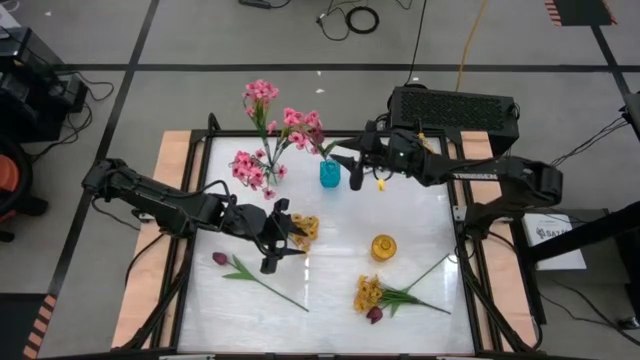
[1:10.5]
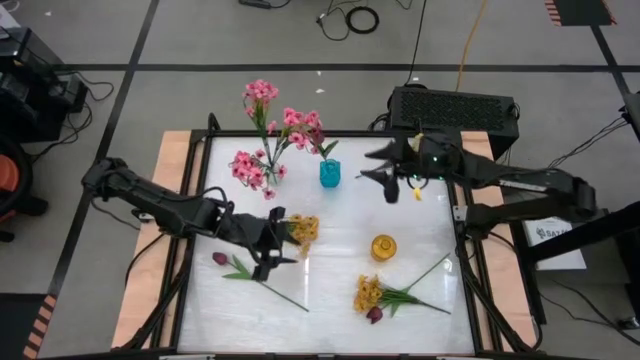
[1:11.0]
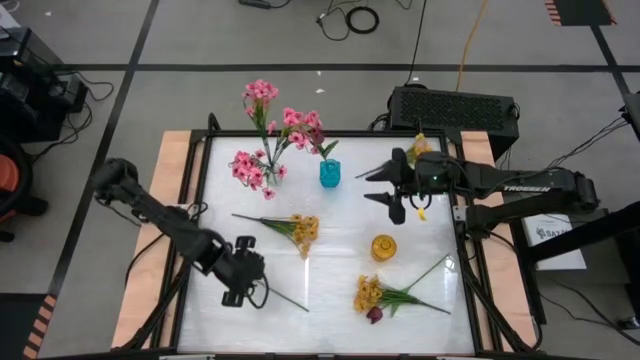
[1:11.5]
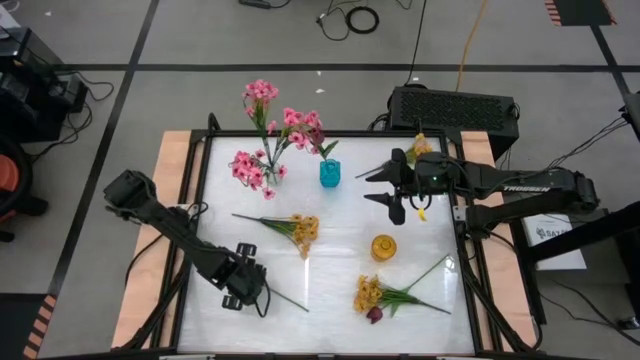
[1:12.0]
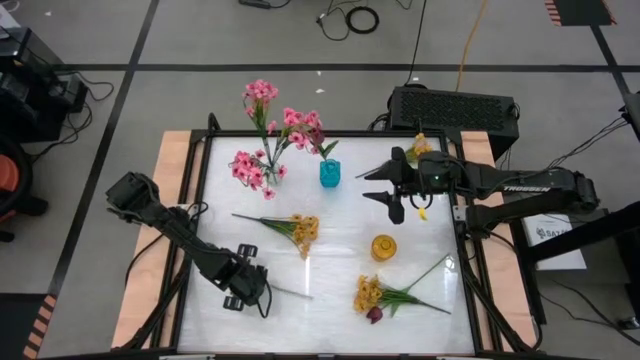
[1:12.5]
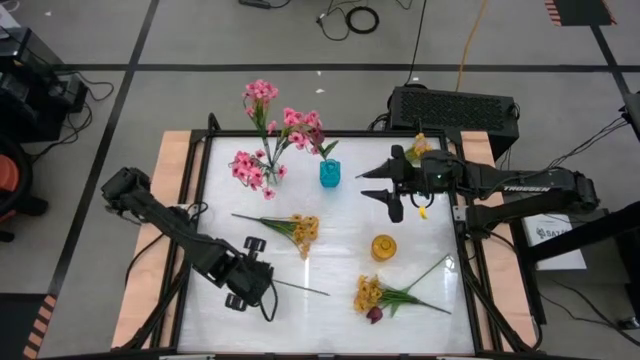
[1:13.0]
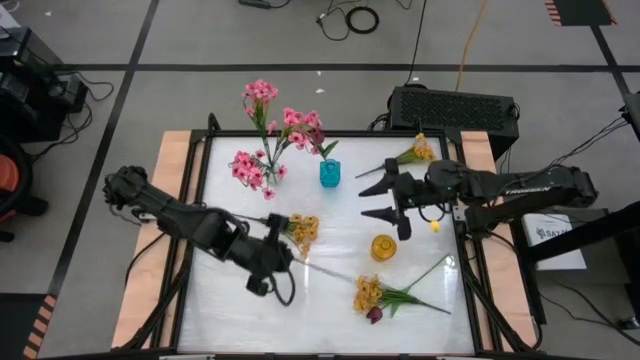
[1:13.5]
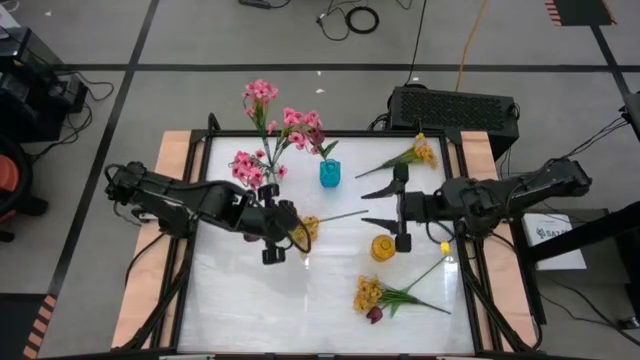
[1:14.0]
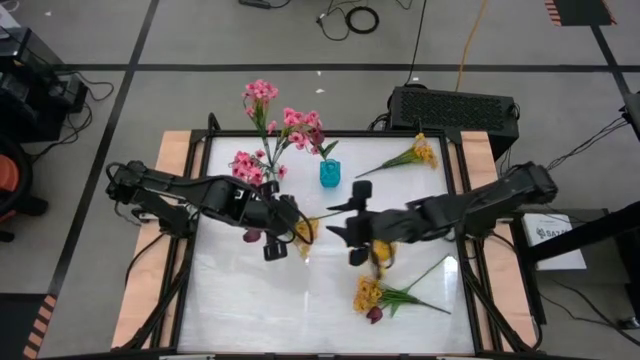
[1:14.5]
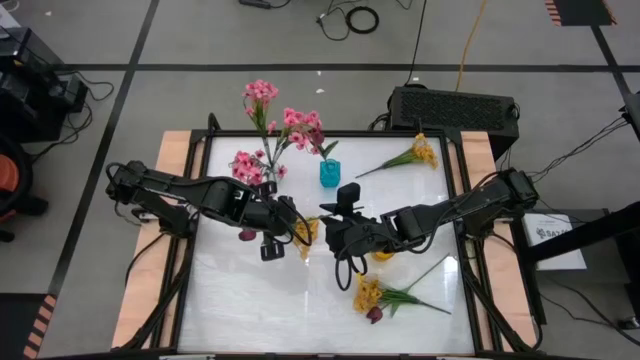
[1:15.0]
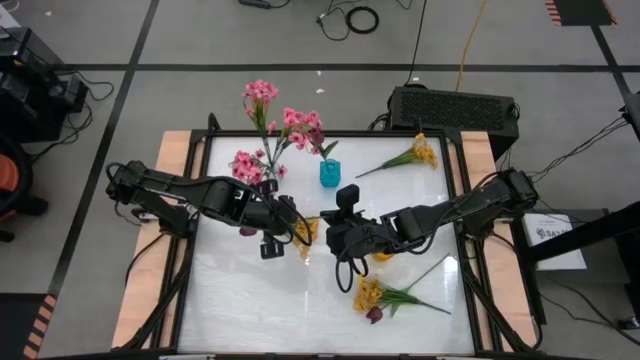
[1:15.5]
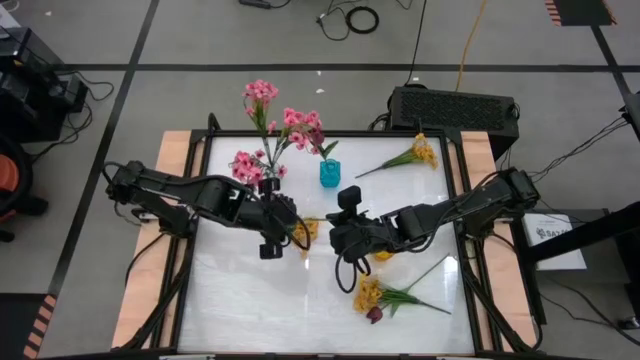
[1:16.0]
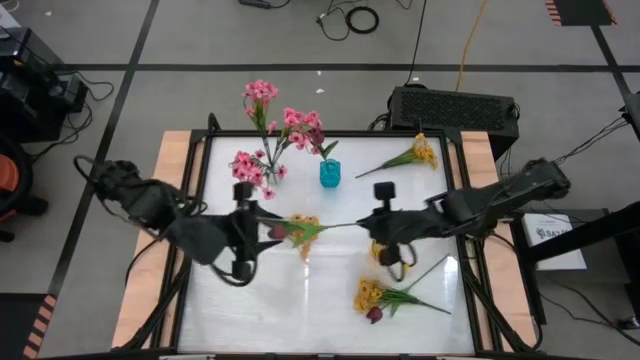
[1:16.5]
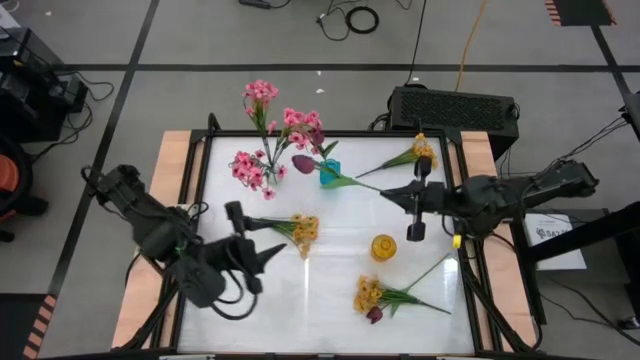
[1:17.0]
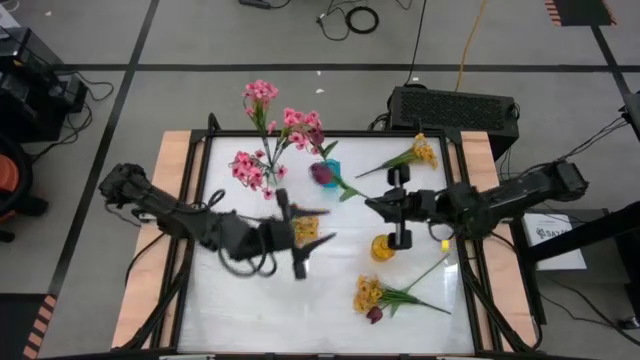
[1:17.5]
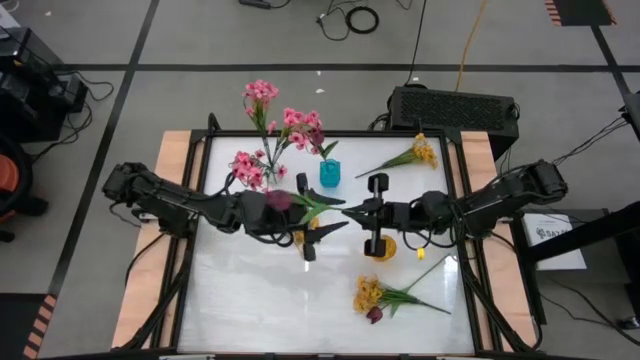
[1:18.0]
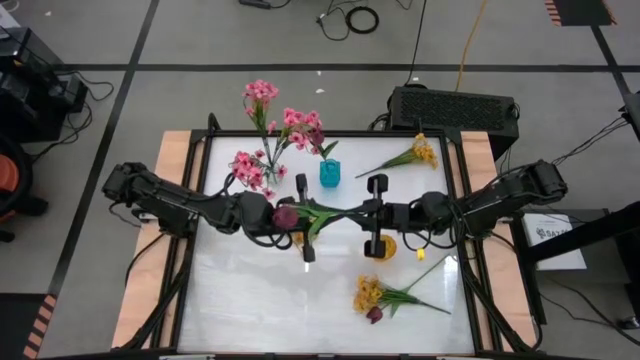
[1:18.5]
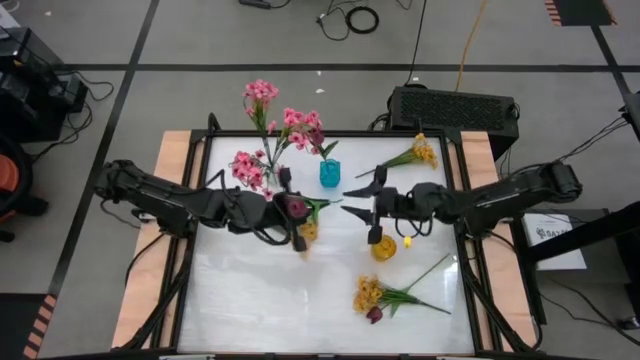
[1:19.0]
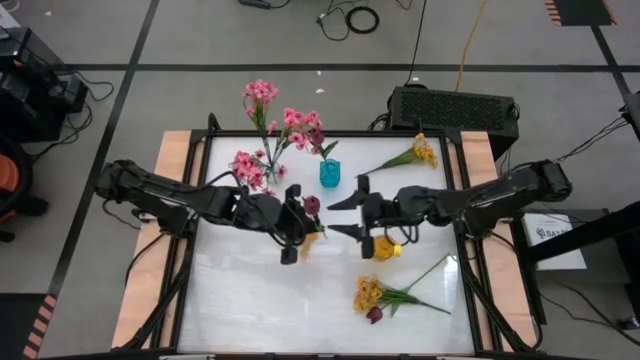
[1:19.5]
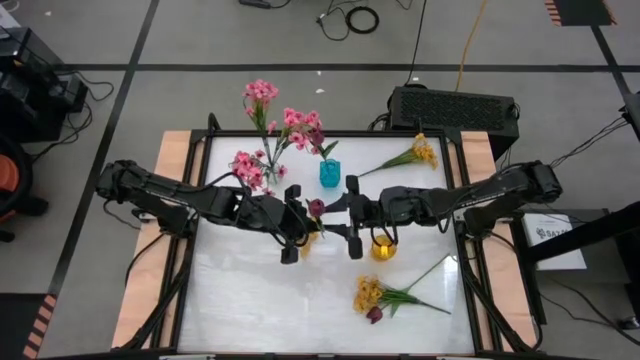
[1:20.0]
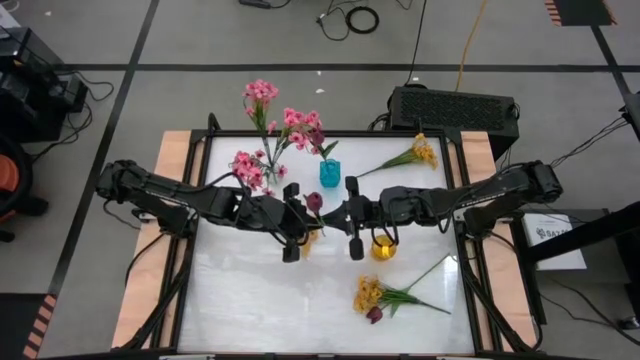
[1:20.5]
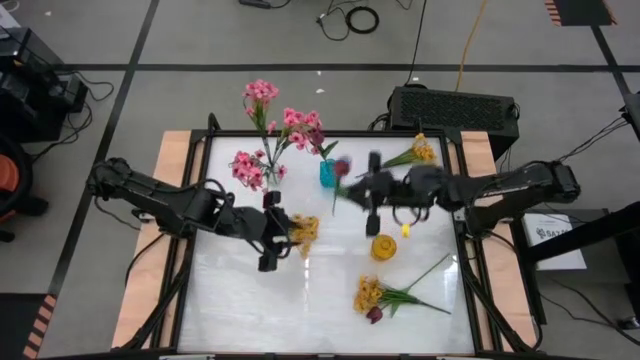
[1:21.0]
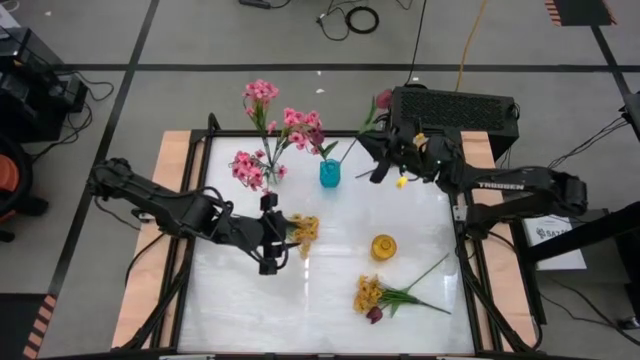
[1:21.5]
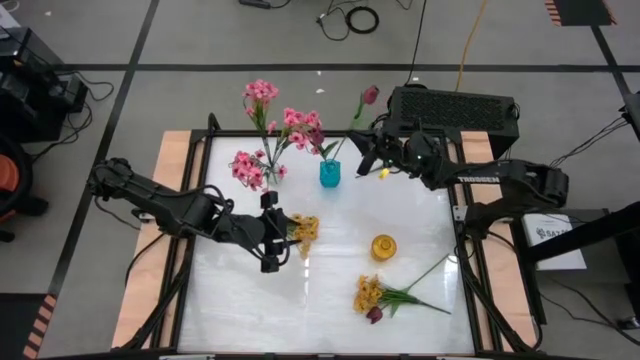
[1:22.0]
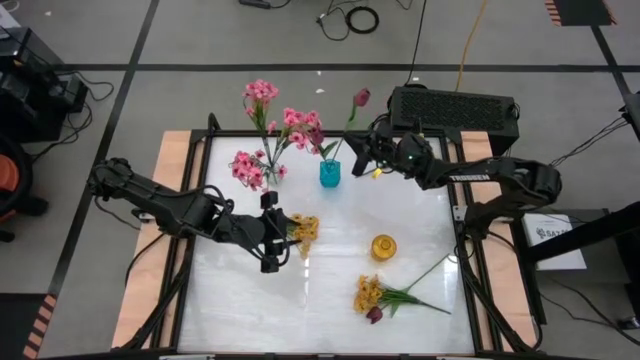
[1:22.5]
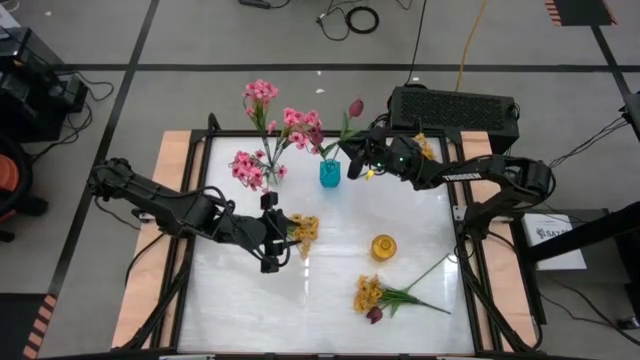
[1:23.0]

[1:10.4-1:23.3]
Task: Sort flowers into vase by color
Put the left red flower into the blue vase

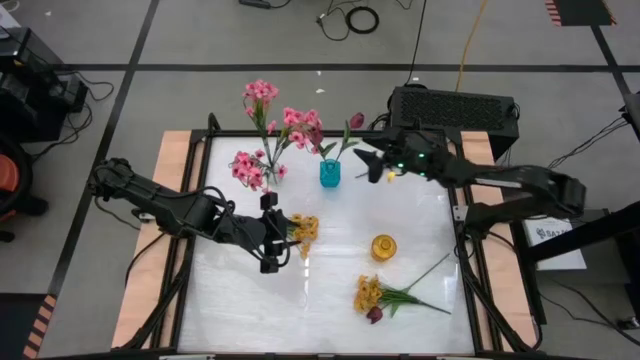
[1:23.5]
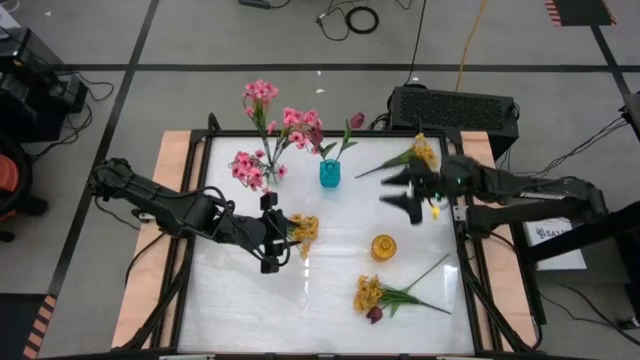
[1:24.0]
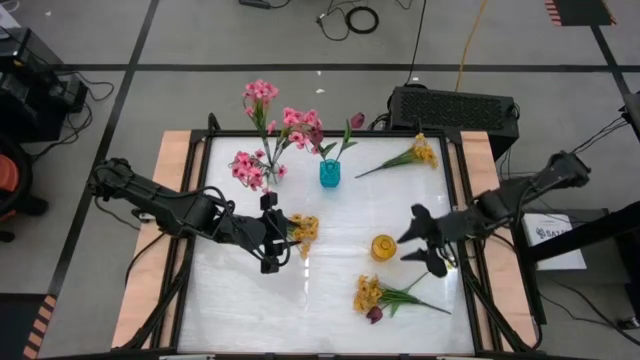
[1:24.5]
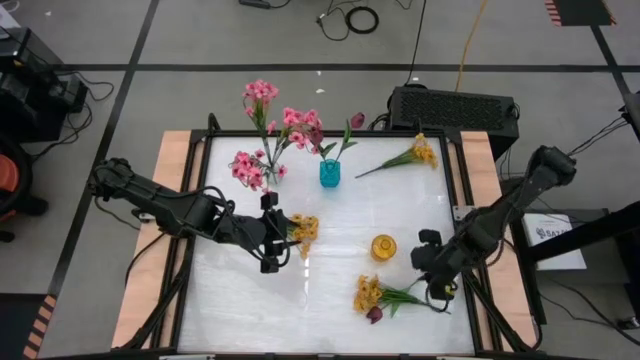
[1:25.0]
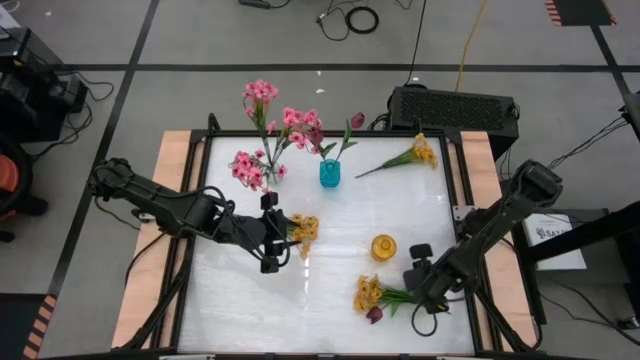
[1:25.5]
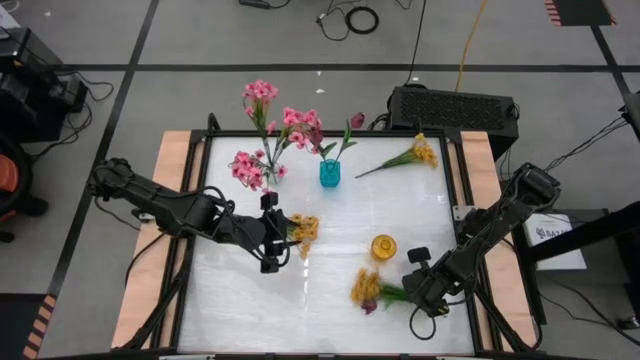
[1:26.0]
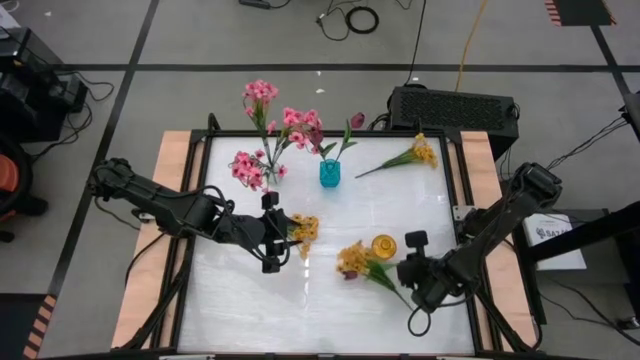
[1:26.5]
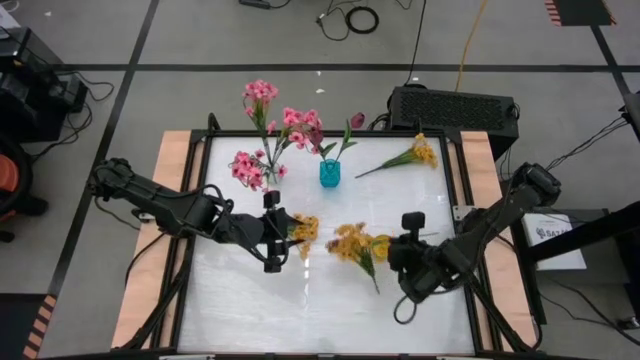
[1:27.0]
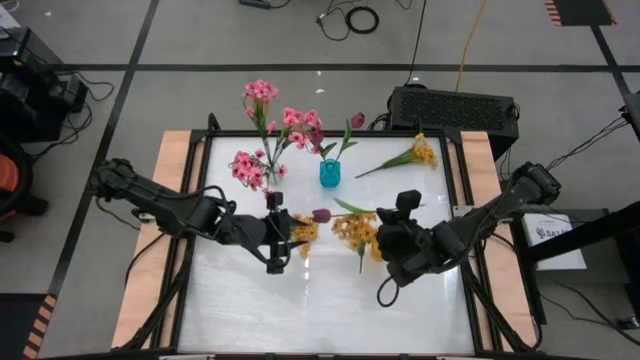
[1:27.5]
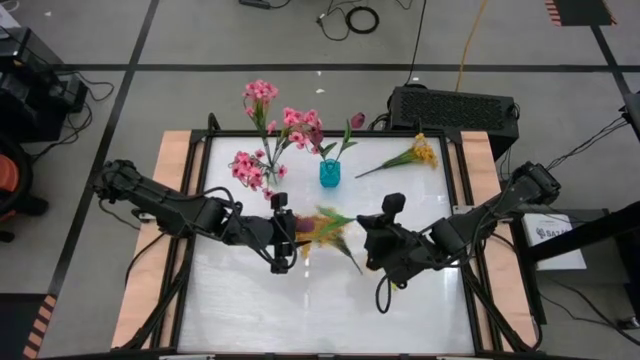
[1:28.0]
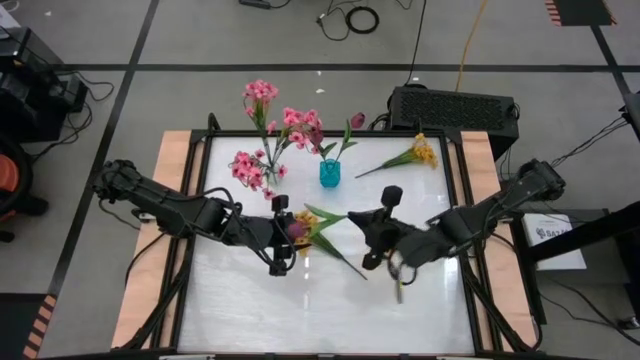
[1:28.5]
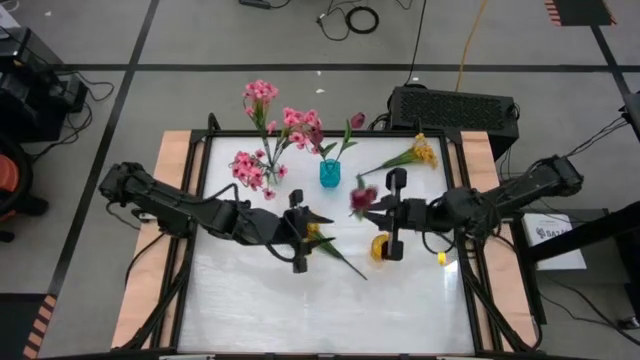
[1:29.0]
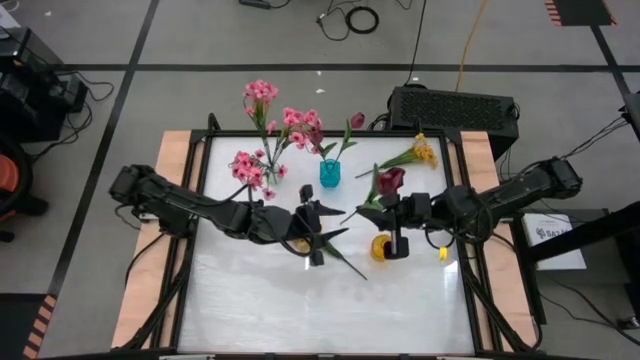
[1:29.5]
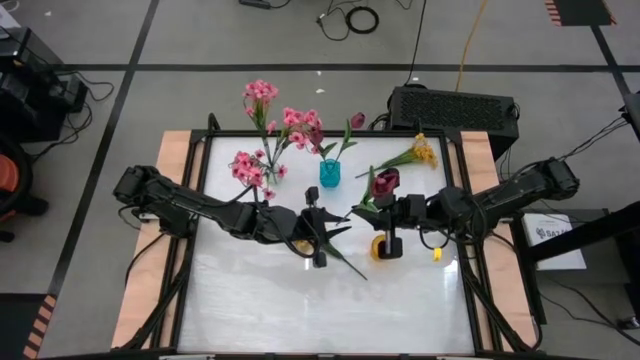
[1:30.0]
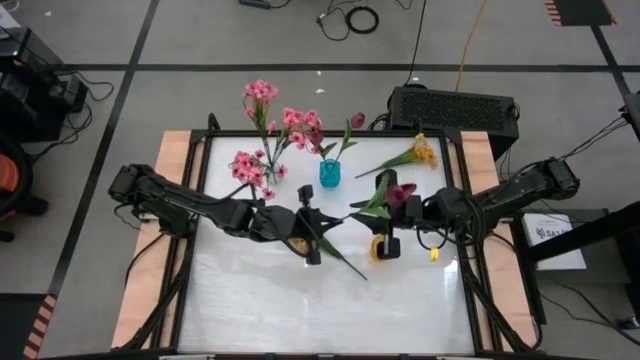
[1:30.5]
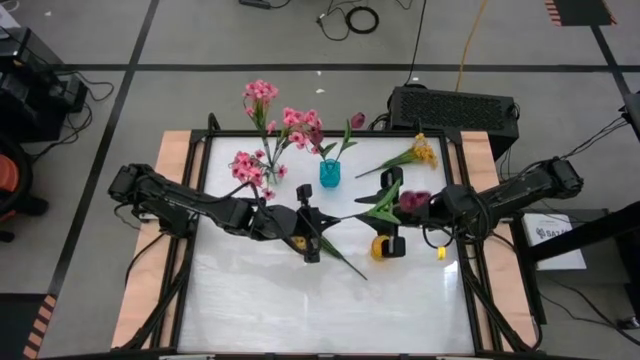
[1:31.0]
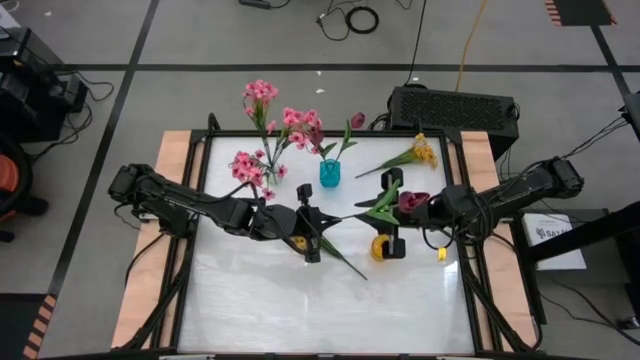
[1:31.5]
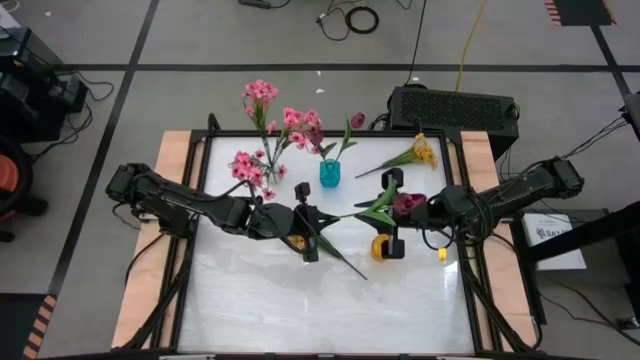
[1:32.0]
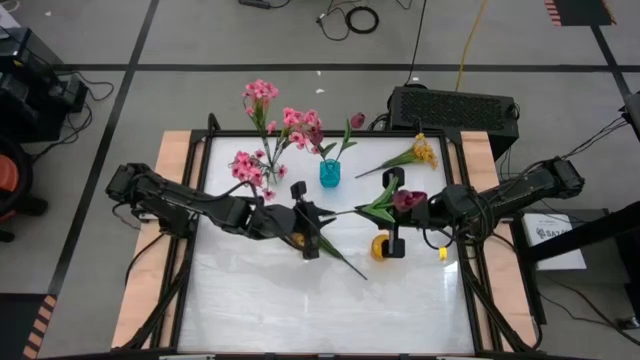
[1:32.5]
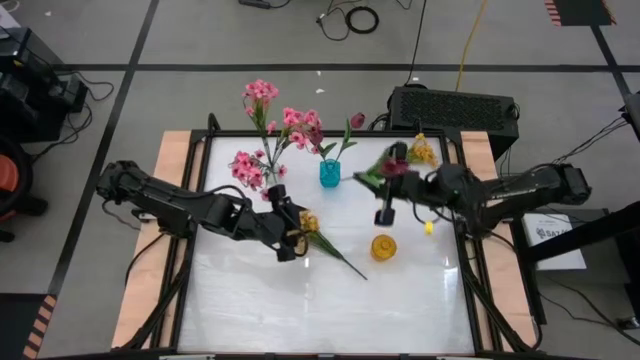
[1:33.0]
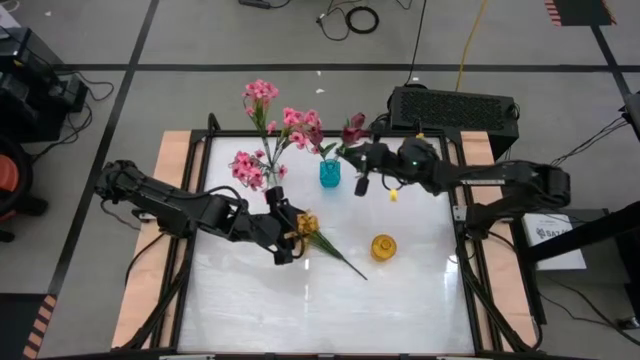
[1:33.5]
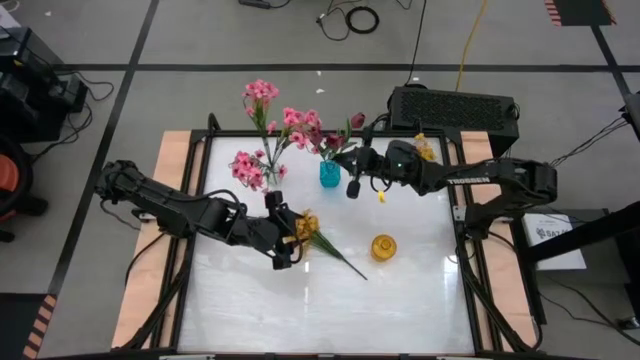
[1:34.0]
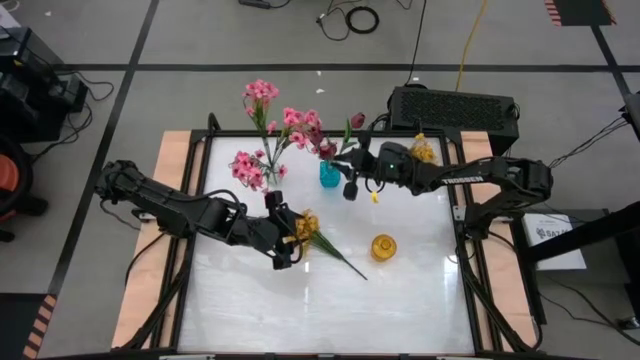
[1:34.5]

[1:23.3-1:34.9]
Put the red flower into the blue vase
